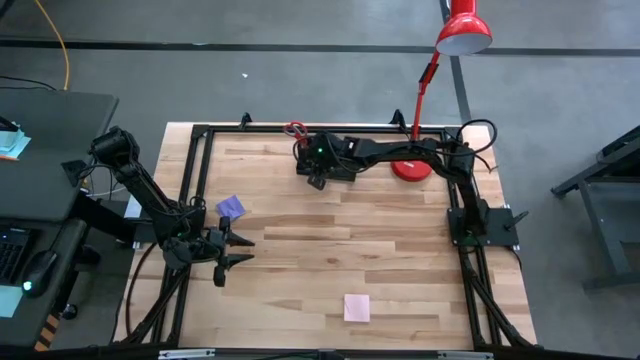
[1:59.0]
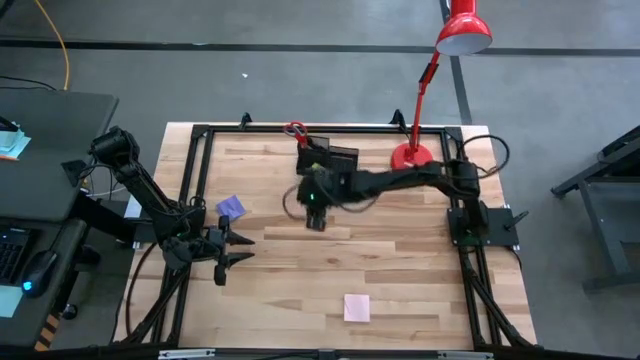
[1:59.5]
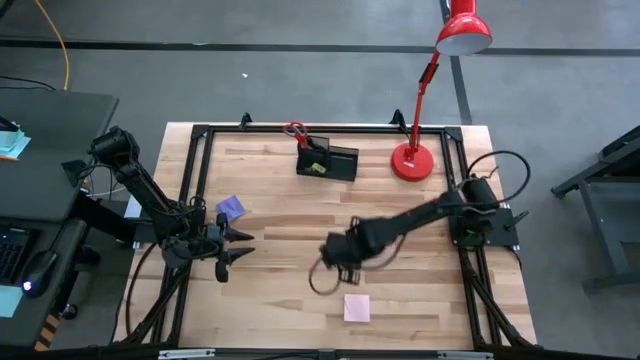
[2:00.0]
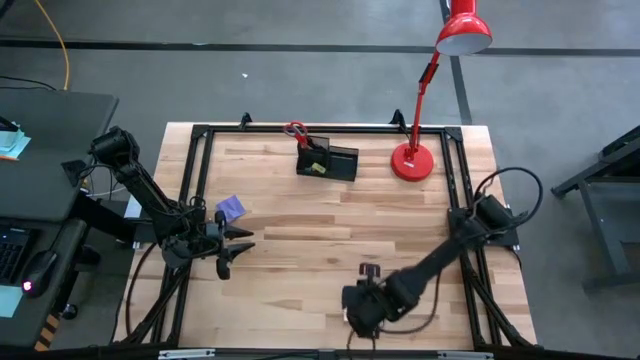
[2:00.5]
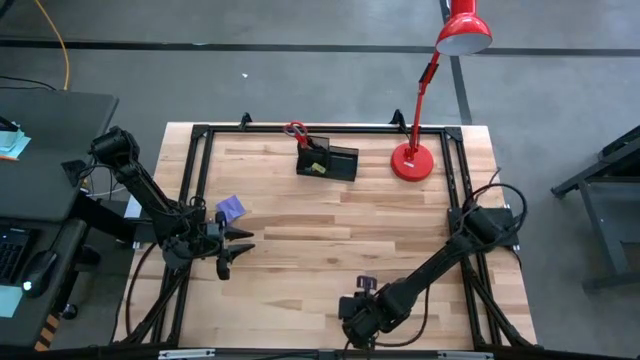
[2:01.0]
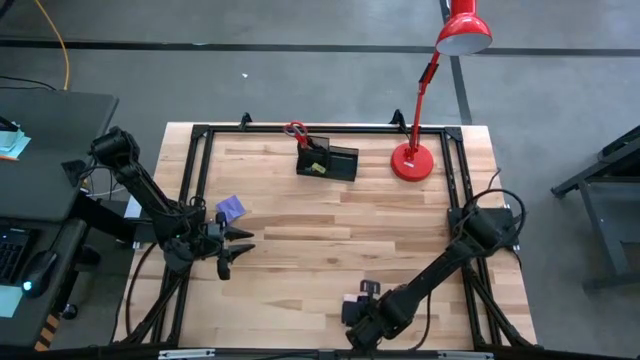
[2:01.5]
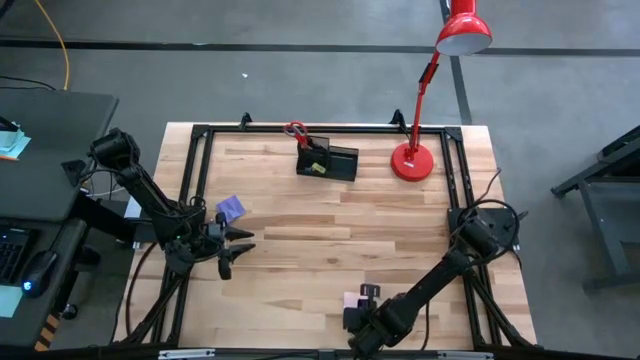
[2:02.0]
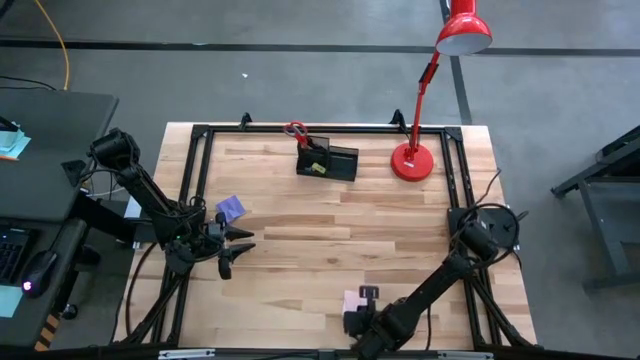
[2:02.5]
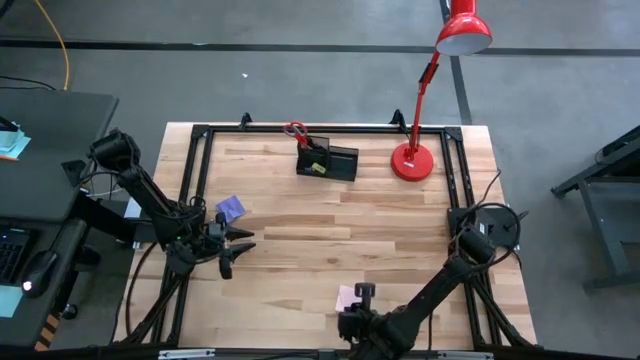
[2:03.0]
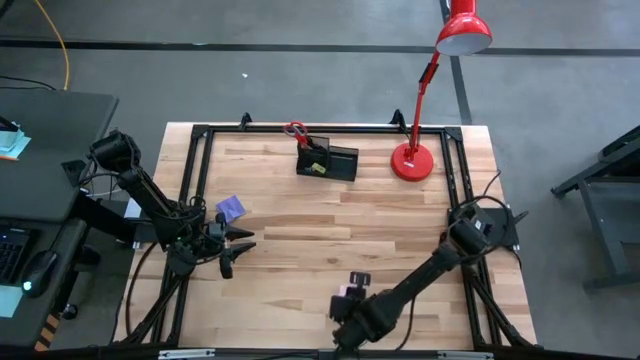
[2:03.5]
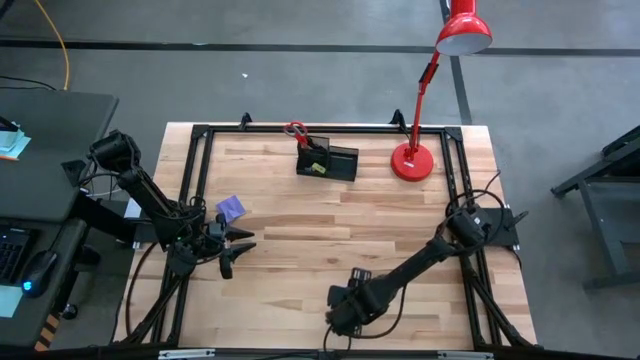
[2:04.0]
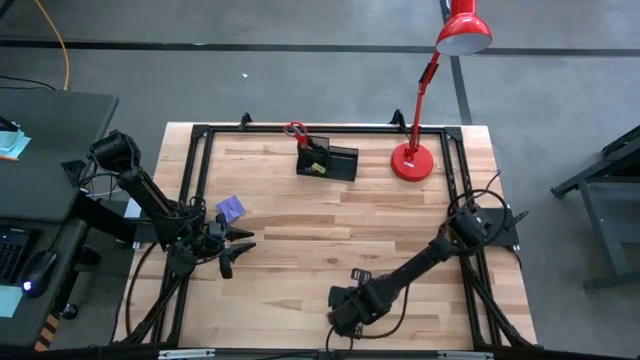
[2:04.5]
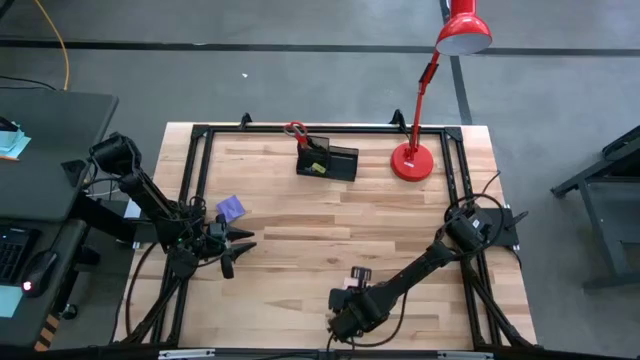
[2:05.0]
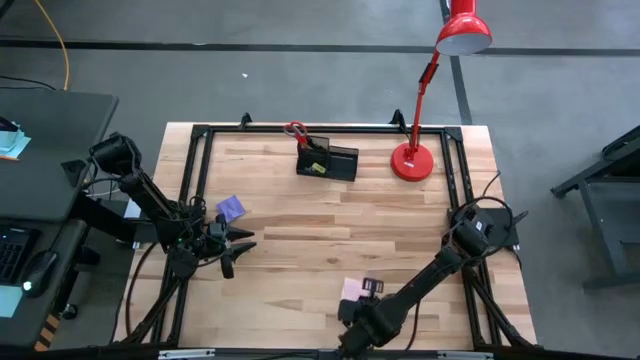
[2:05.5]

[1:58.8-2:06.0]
Task: Pick and place office supplies into organizer
Put the pink sticky notes into the desk organizer

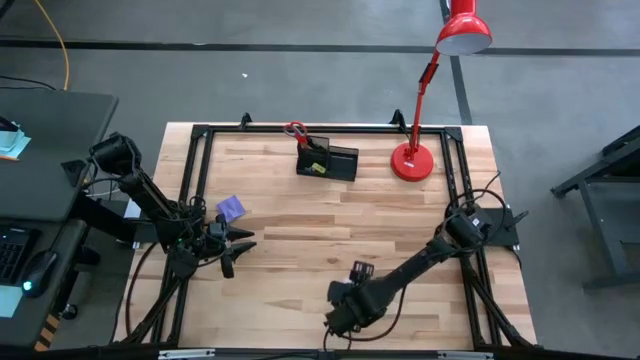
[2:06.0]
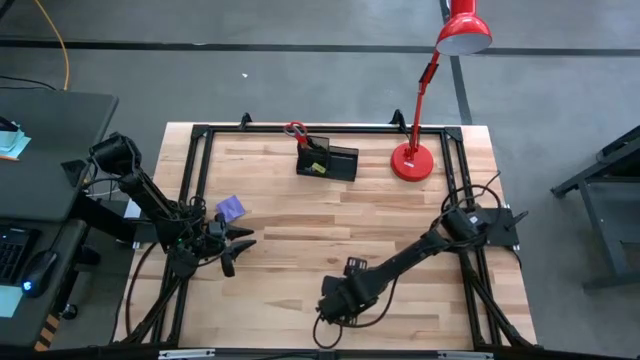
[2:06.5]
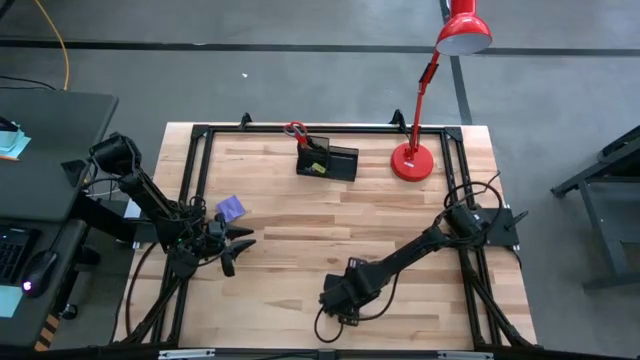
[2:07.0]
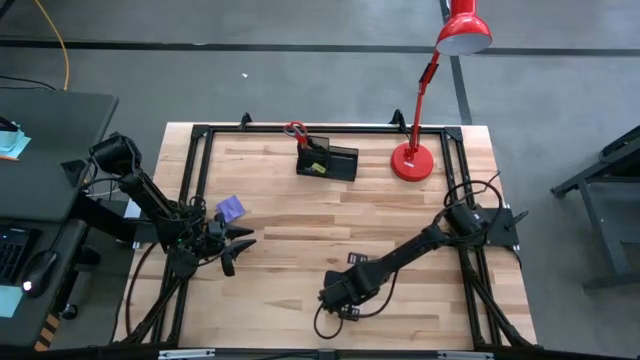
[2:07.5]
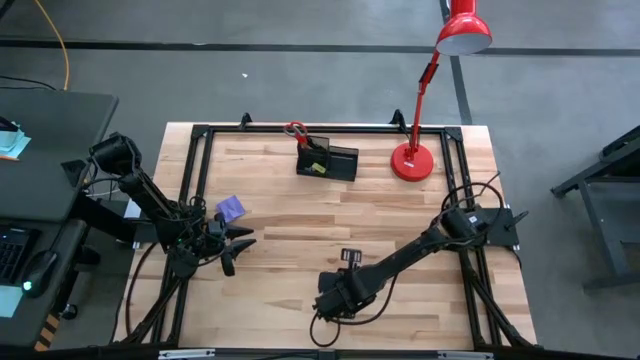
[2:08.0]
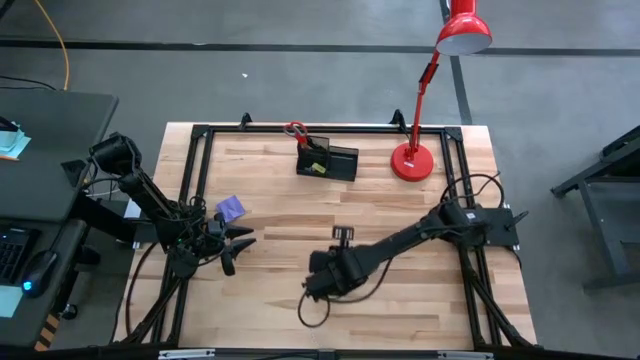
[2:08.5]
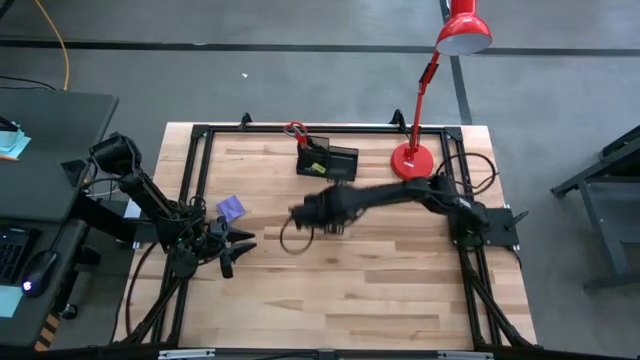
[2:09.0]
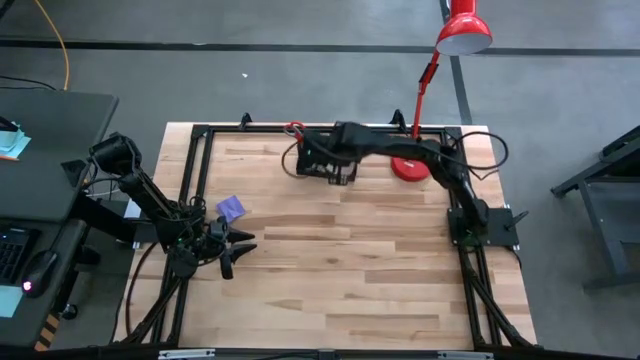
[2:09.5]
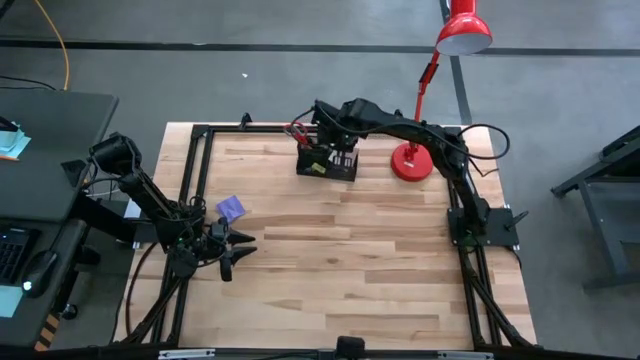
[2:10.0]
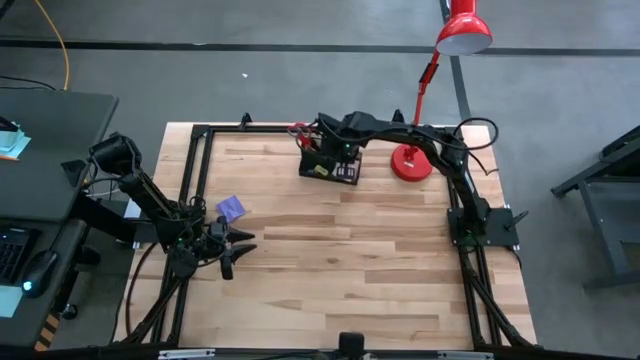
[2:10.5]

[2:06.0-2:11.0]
Put the pink sticky notes into the desk organizer

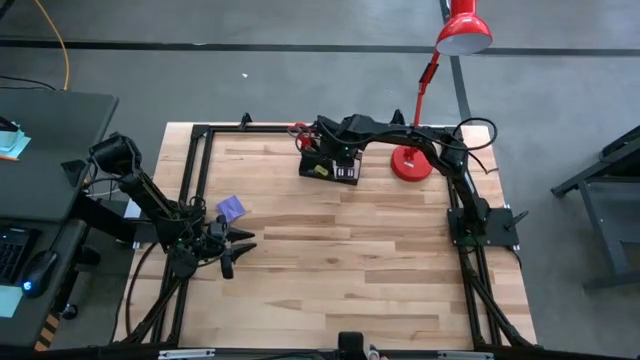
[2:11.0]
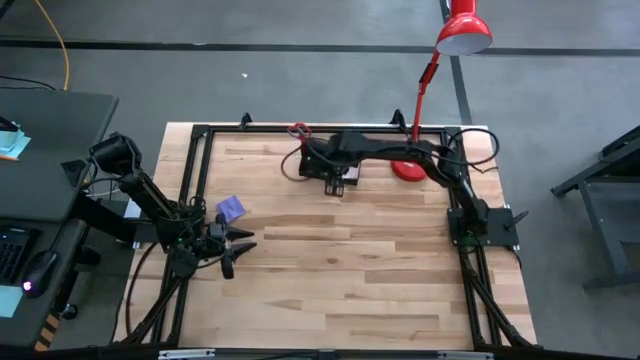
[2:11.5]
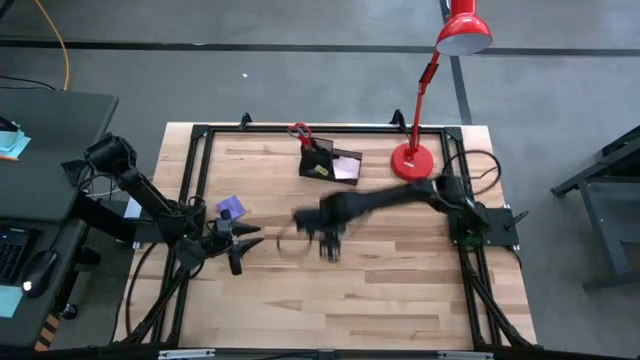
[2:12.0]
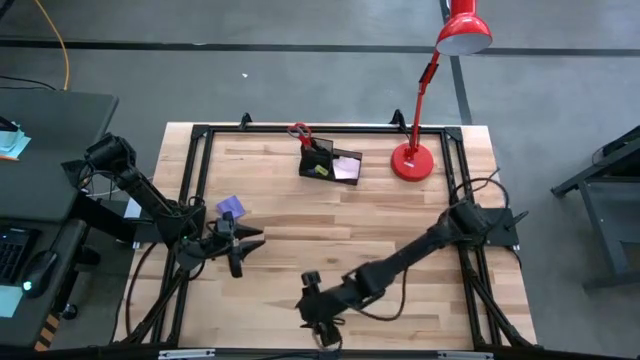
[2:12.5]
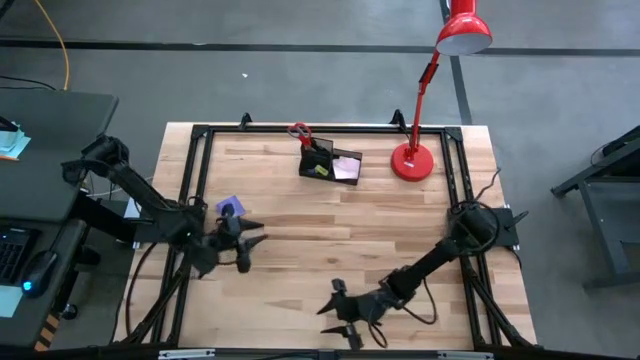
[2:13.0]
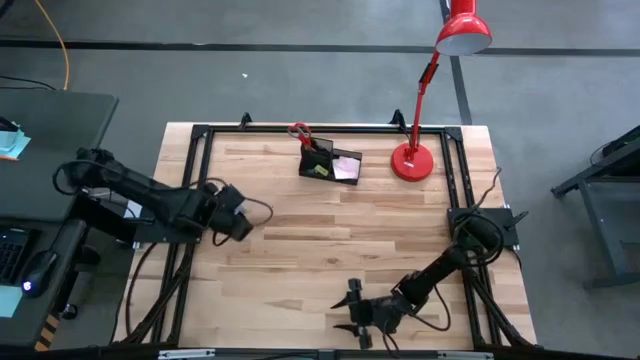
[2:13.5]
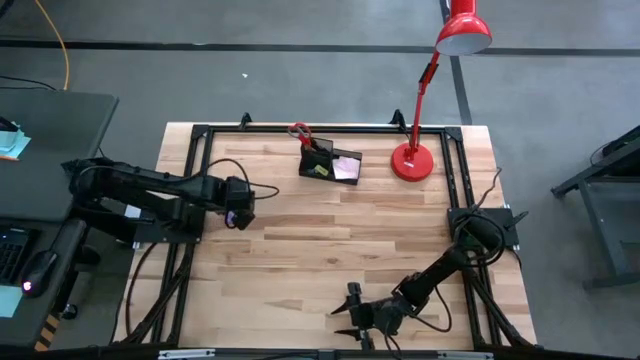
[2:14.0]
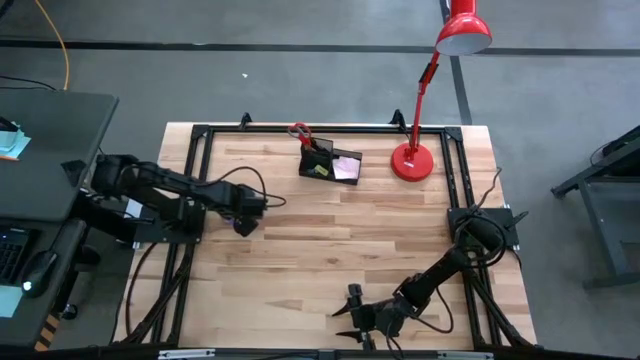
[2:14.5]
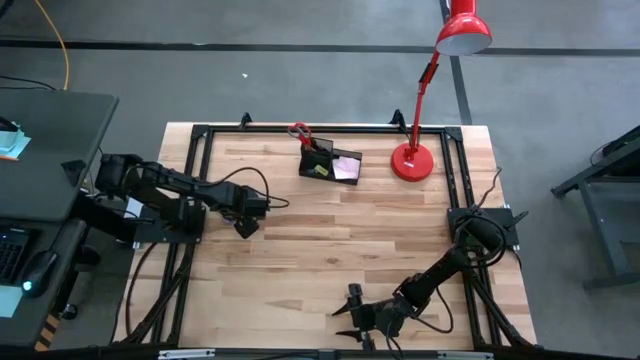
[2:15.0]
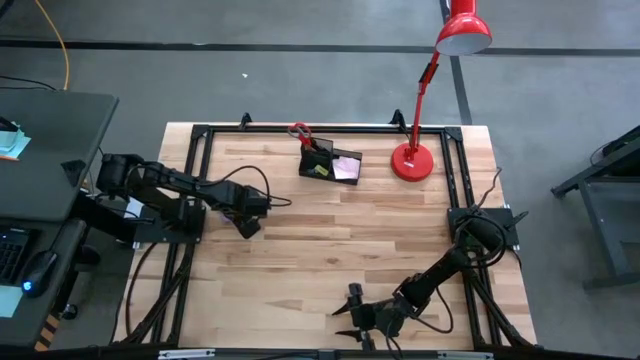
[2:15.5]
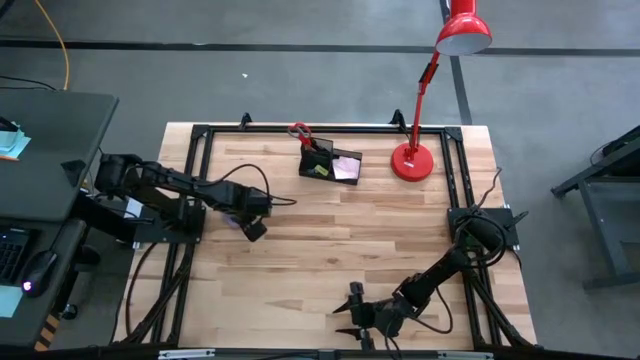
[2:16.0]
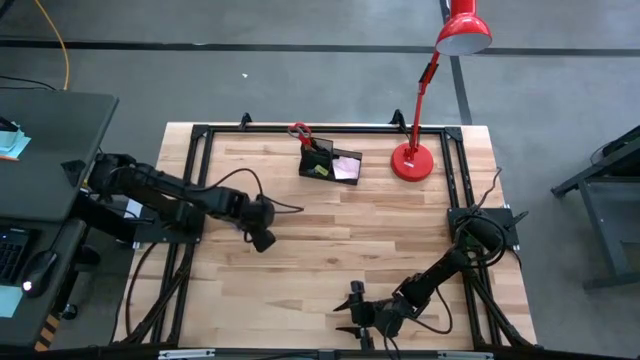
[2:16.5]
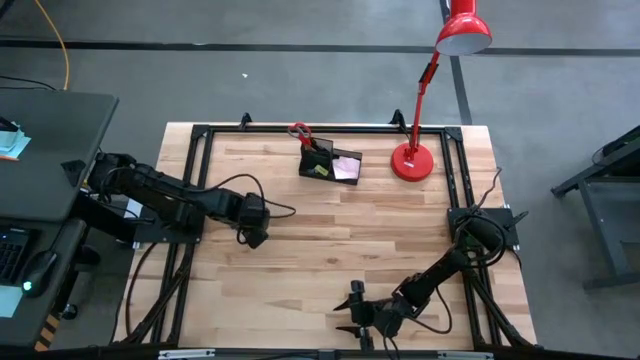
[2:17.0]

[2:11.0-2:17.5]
Put the blue sticky notes into the desk organizer

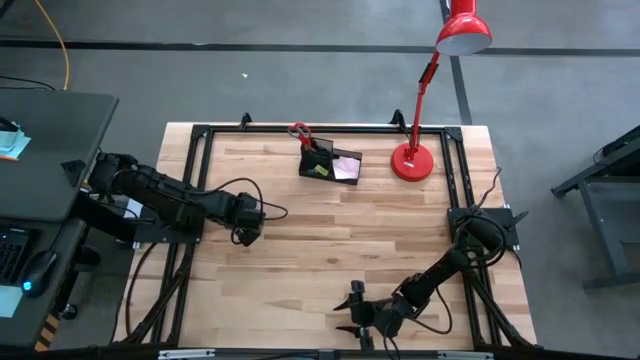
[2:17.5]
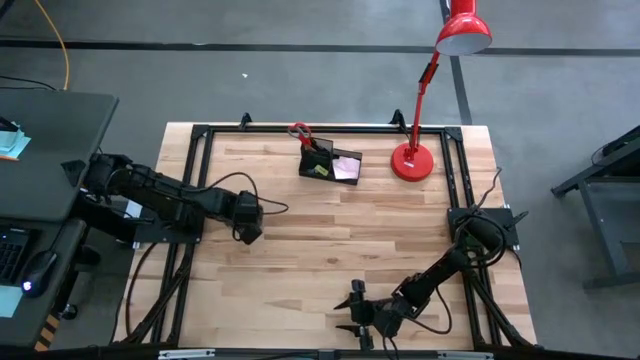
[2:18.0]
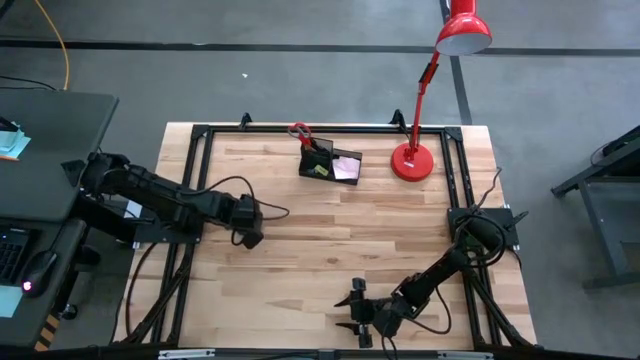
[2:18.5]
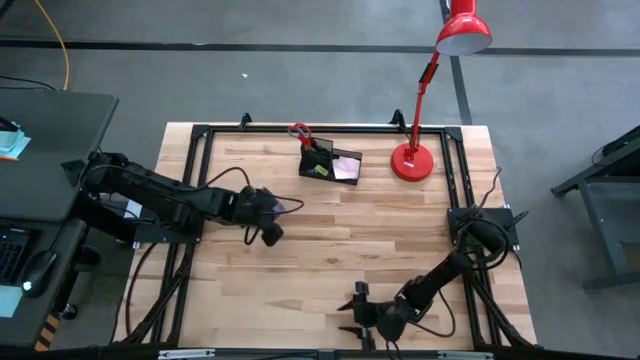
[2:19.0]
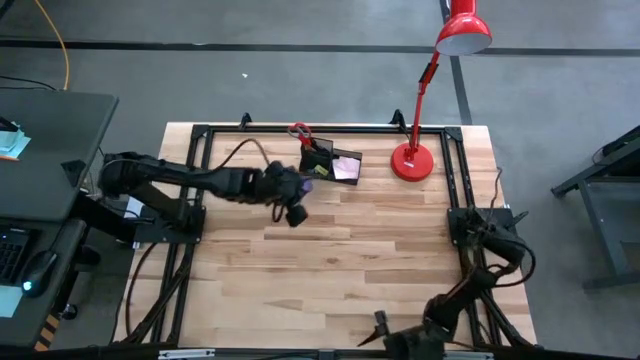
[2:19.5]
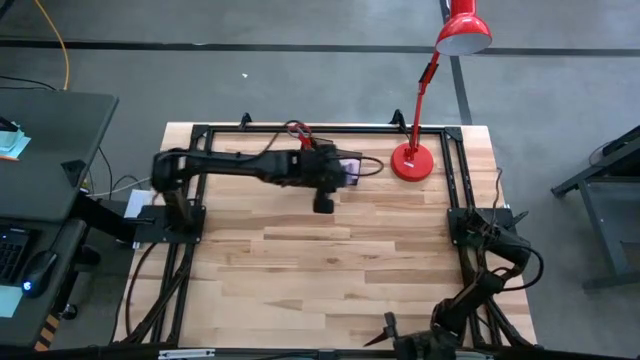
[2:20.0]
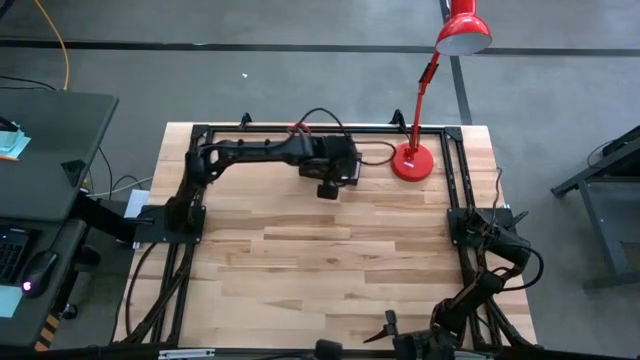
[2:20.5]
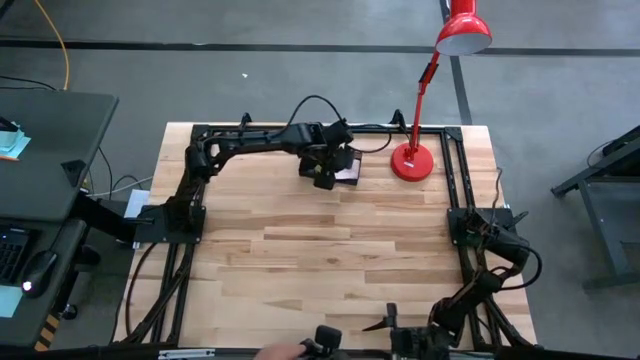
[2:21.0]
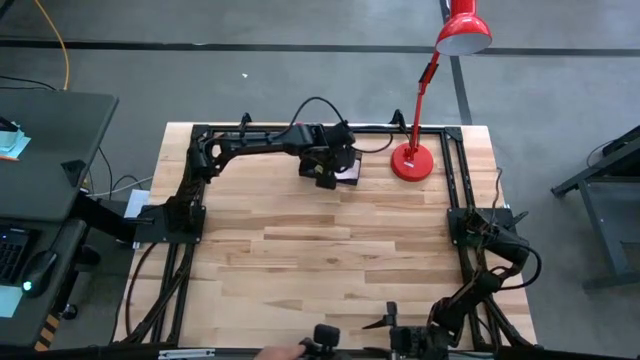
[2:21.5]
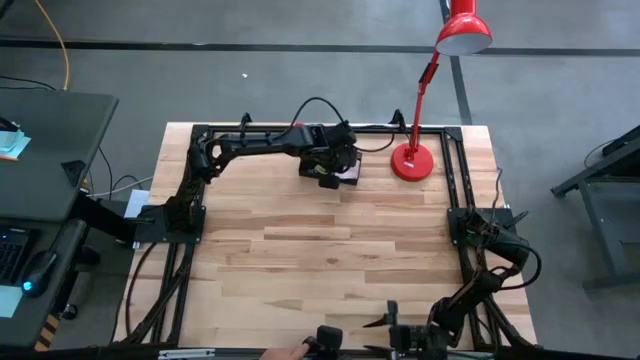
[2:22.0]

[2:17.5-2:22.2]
Put the blue sticky notes into the desk organizer
